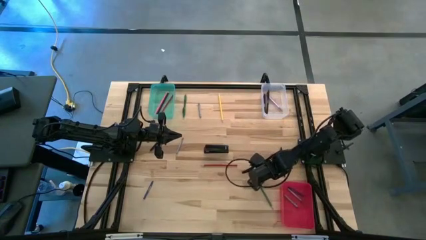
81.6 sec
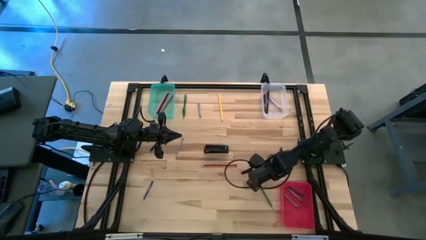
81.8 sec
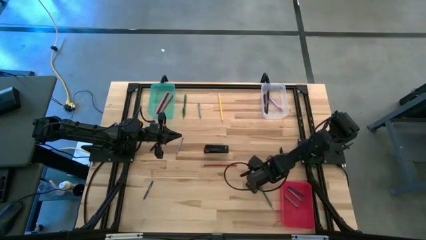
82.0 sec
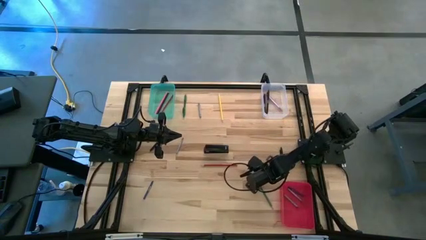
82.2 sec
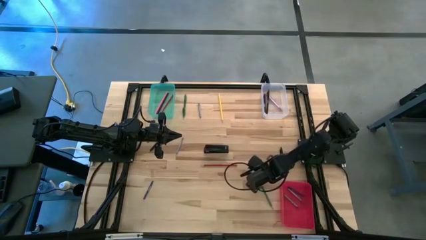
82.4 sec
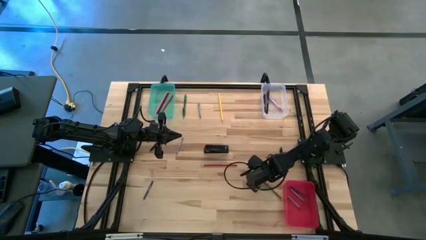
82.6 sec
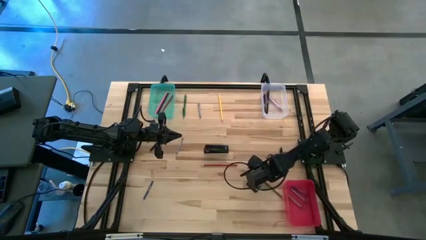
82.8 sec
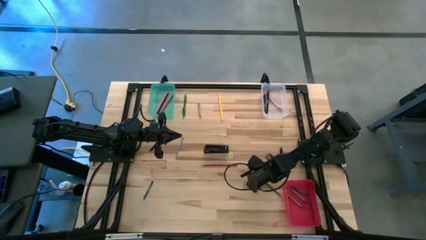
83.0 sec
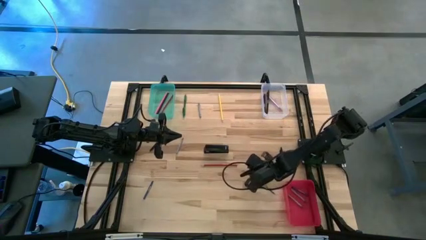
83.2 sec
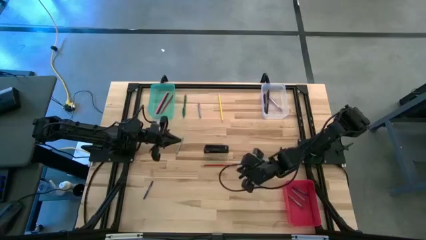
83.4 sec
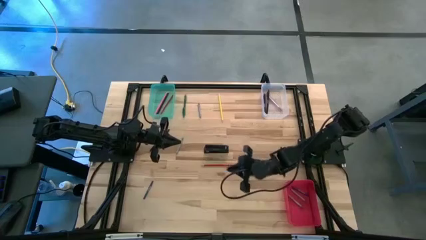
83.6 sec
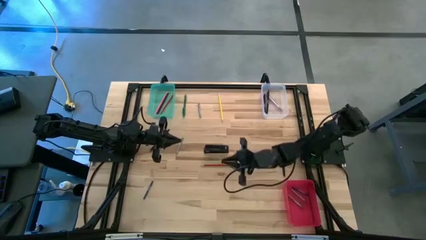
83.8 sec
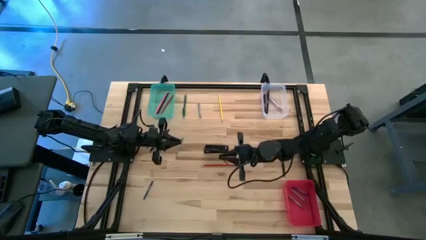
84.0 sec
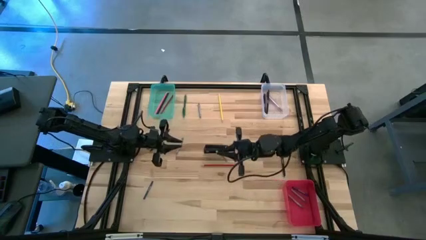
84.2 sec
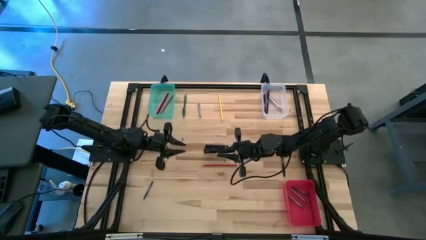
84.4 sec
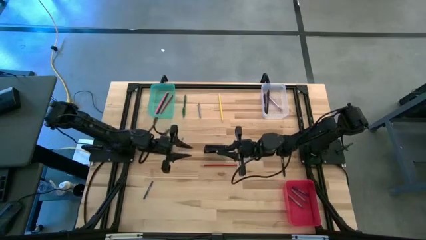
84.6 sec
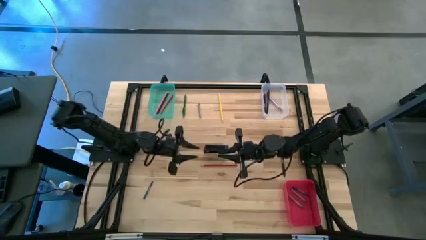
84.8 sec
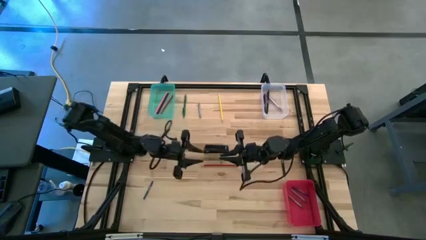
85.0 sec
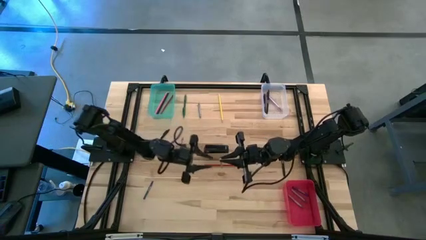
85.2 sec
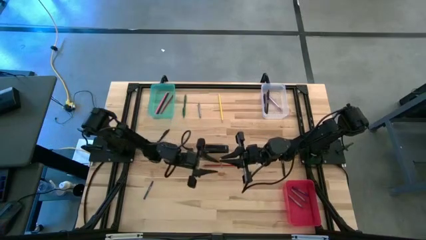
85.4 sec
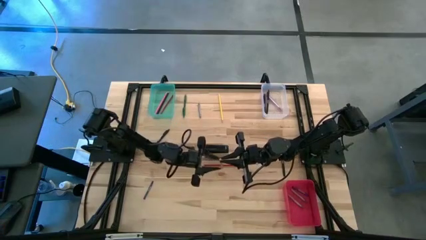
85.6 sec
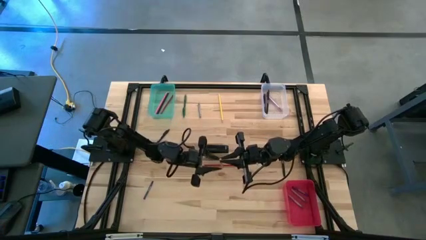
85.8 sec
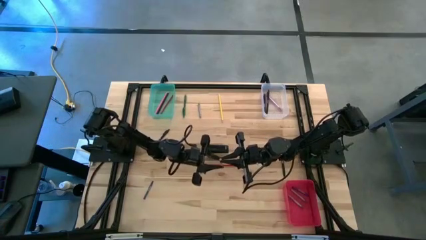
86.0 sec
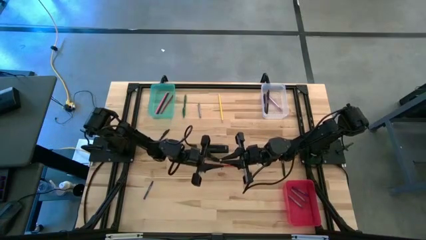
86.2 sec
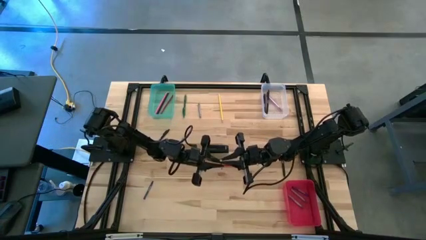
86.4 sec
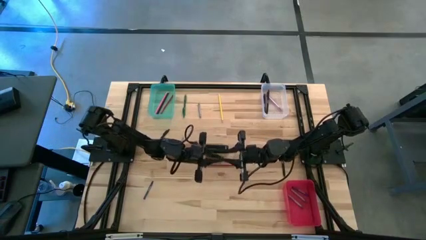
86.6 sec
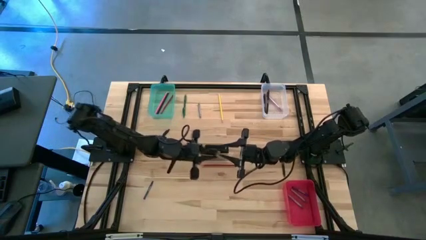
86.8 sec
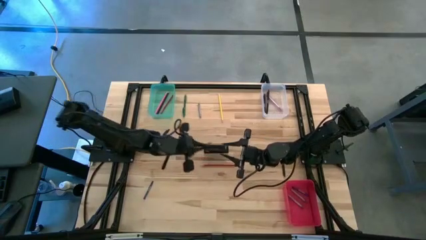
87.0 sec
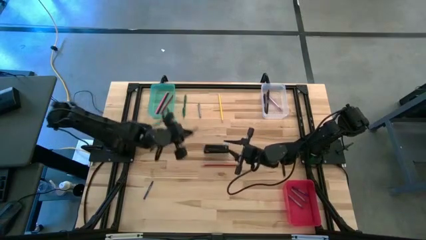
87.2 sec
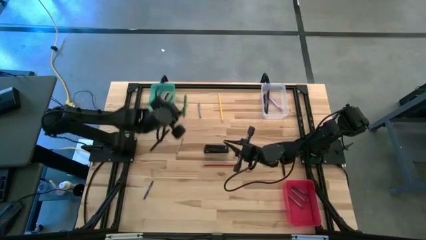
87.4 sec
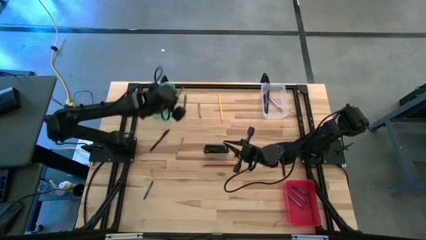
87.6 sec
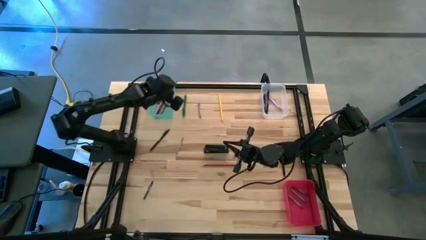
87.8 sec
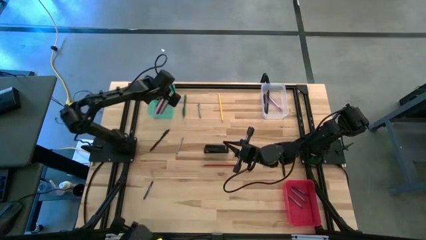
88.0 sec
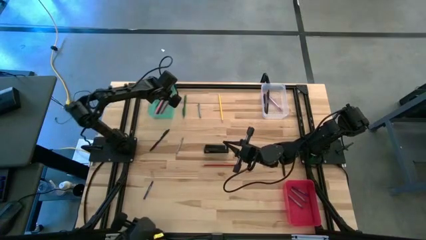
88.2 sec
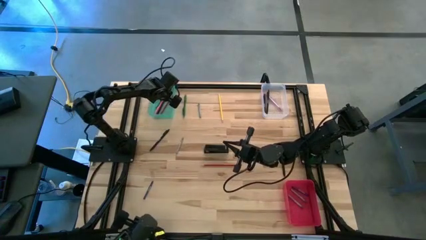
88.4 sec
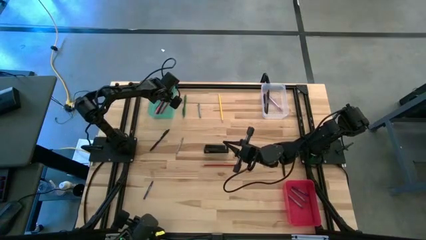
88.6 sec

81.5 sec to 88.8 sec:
Task: Sort crayons/erasers/pens/pencils in bins
Put the green pencil into the green bin

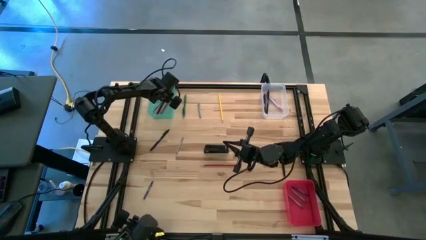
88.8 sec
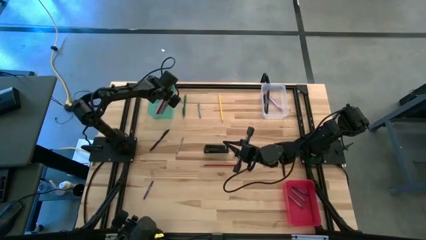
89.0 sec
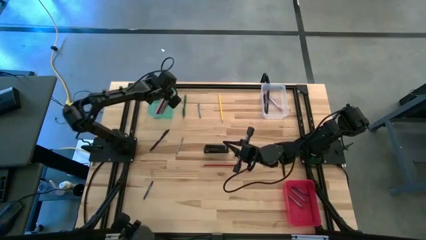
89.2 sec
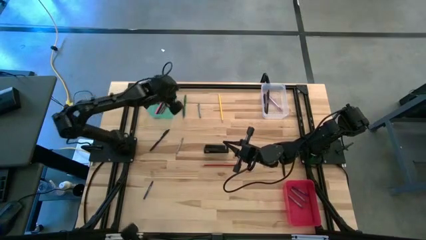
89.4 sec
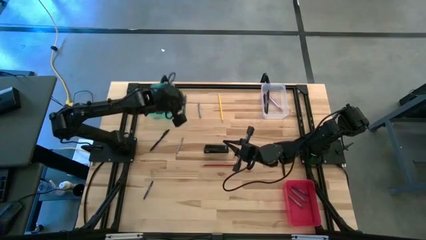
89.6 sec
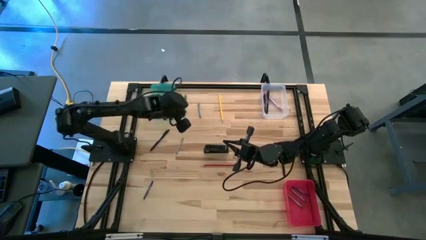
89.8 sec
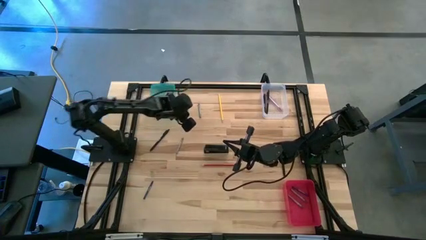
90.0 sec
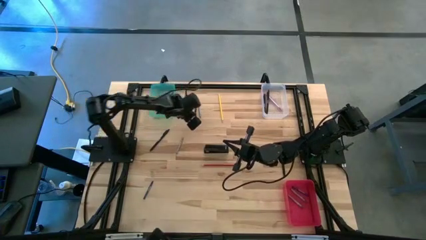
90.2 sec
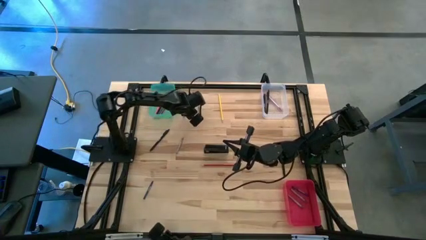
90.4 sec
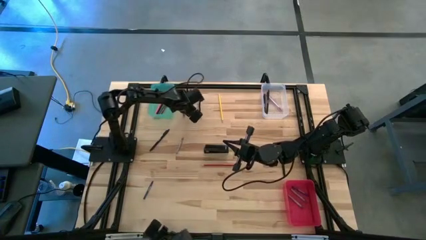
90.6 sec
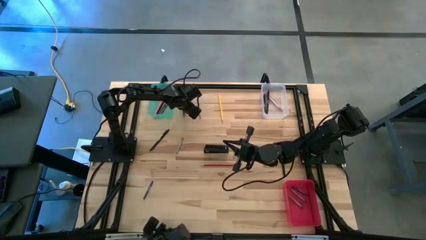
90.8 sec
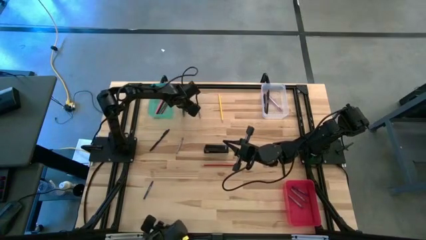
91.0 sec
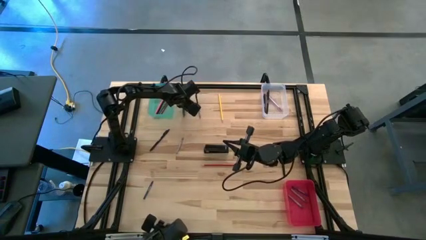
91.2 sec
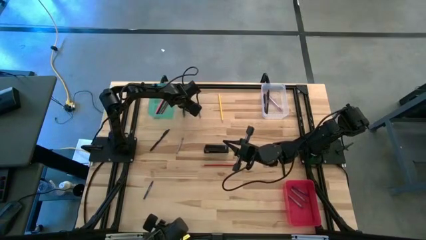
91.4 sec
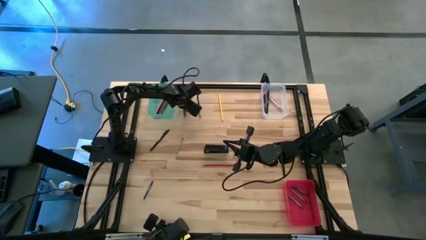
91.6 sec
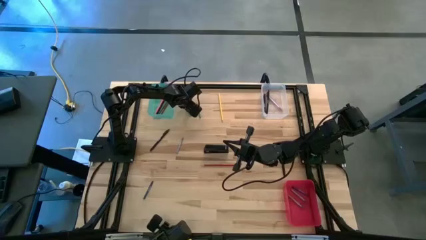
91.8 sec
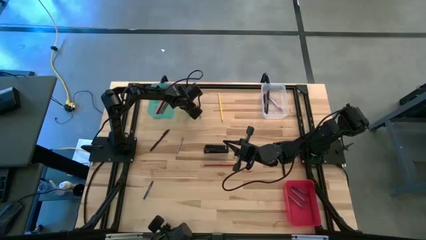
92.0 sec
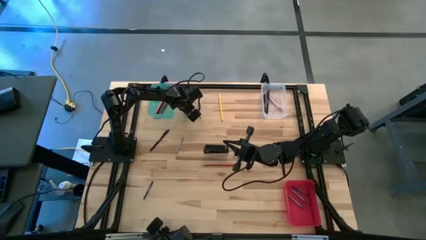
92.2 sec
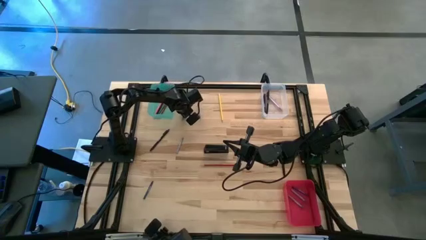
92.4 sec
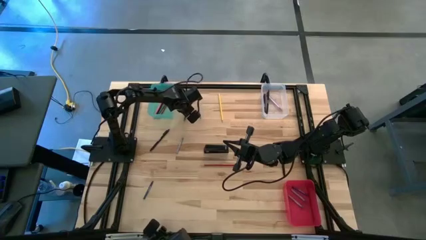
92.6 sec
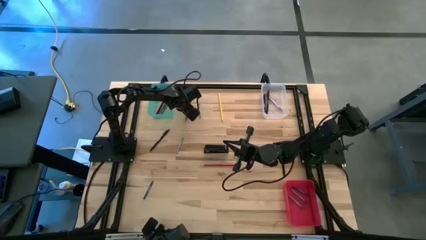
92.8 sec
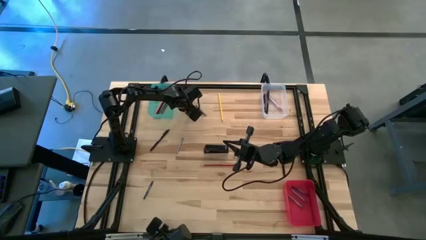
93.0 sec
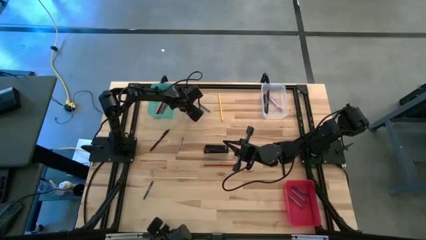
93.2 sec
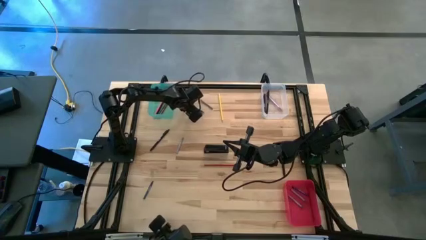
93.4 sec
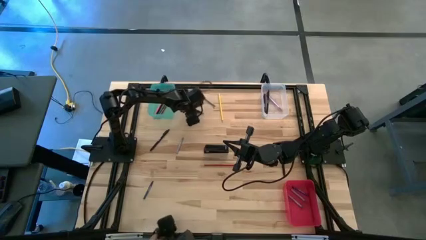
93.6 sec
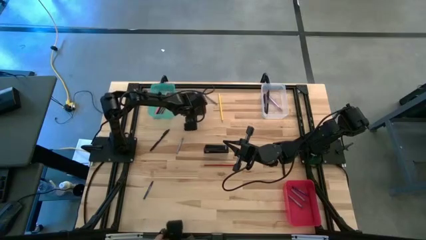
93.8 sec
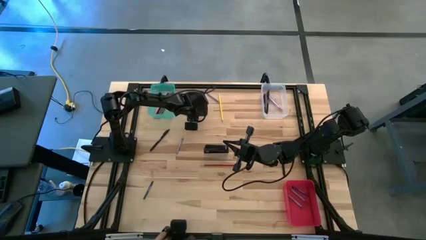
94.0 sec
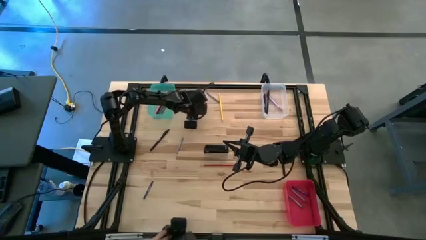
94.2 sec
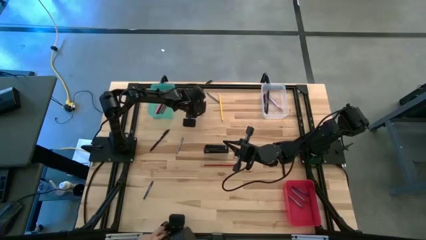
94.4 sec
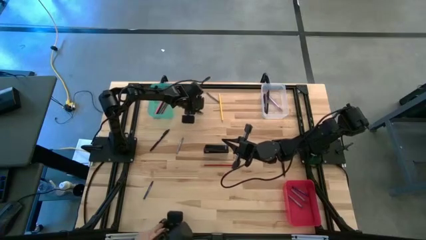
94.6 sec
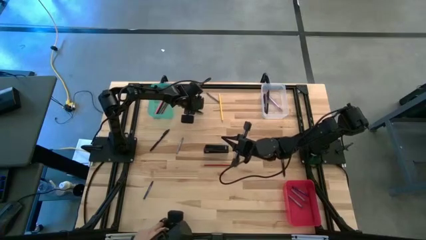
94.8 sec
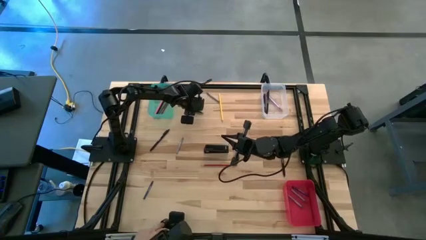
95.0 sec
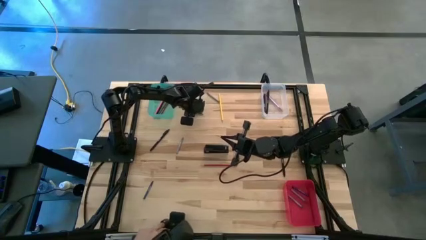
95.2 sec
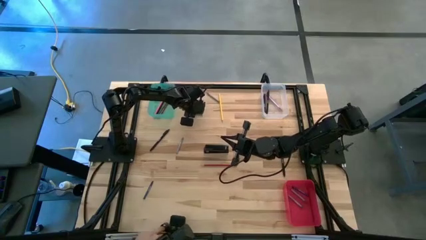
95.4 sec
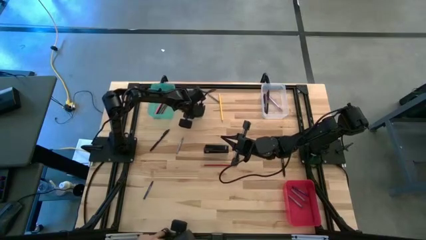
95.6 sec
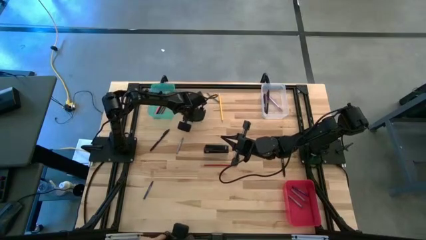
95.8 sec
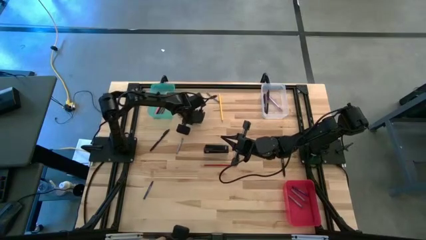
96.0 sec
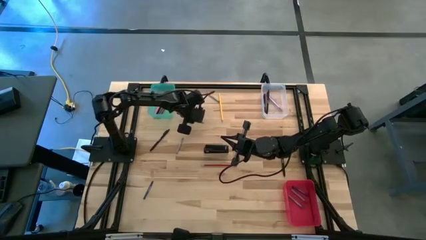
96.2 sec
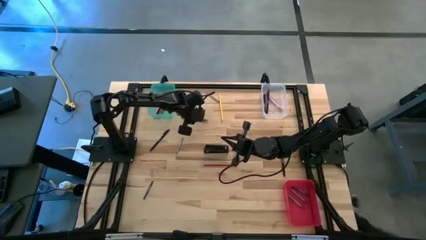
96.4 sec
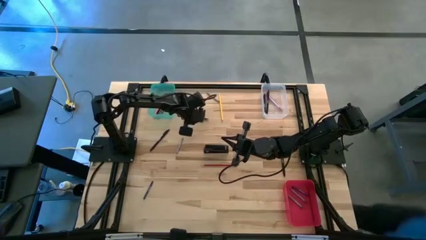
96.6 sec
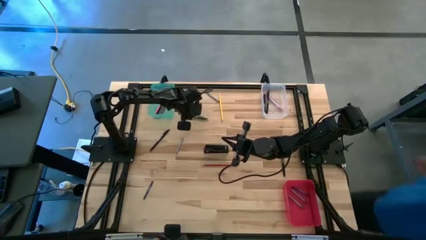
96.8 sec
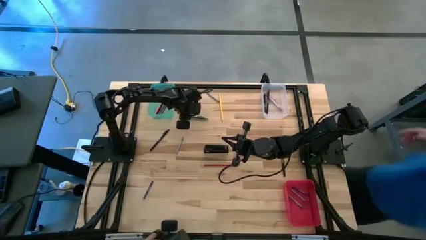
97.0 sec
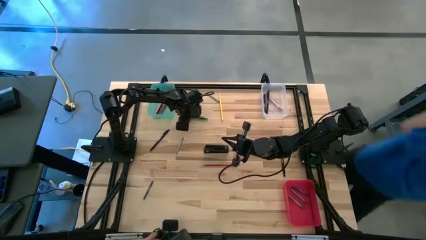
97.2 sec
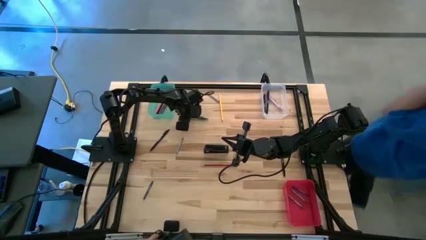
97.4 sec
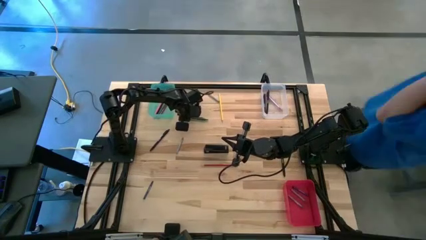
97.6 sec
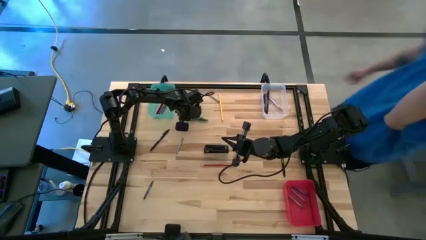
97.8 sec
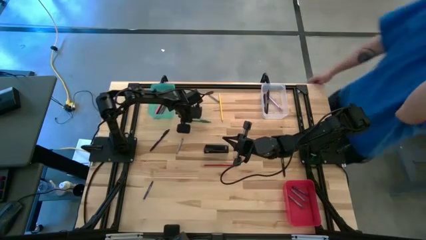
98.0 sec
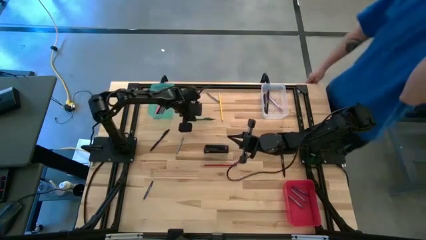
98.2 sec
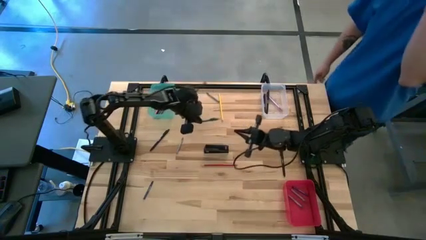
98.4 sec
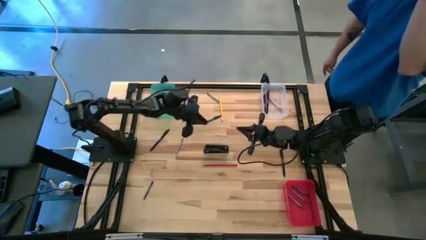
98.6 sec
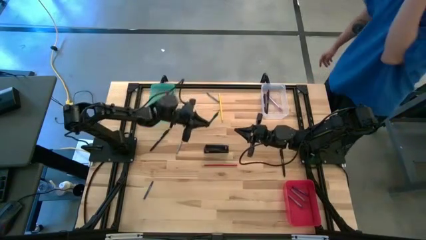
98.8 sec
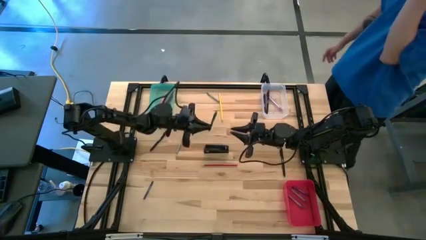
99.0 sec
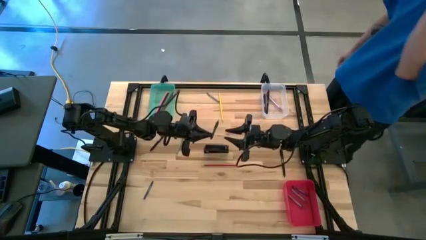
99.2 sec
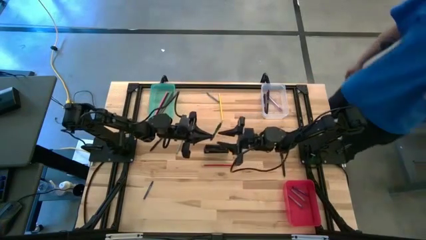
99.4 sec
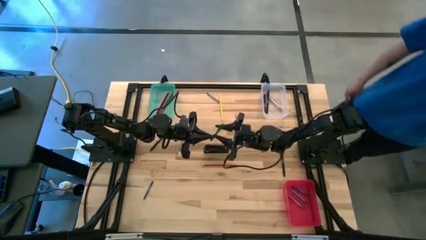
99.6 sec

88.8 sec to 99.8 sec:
Put the green pen into the transparent bin
